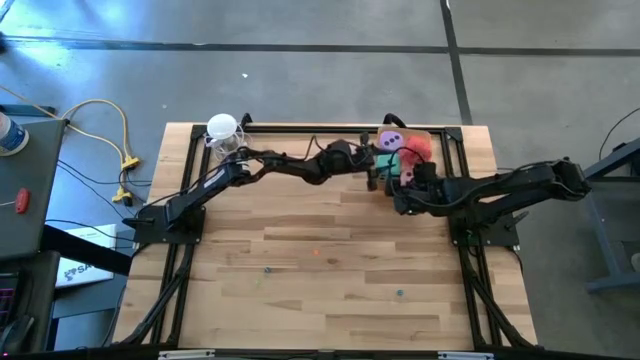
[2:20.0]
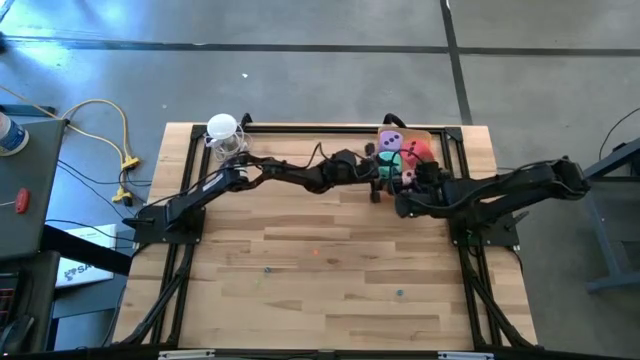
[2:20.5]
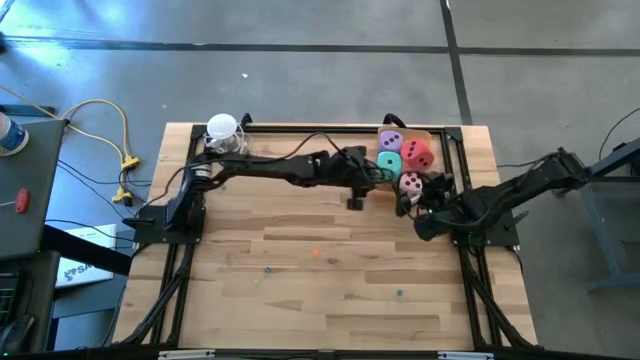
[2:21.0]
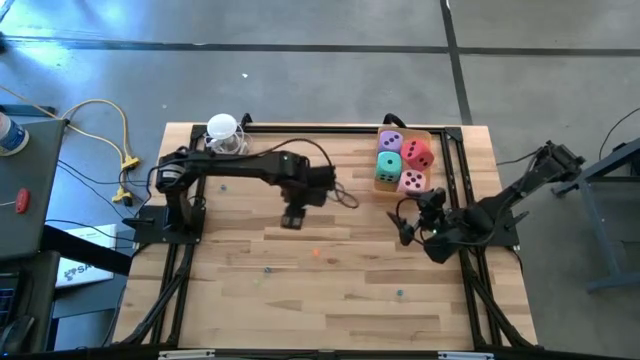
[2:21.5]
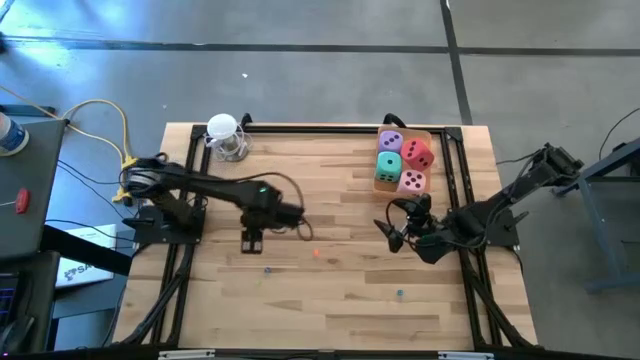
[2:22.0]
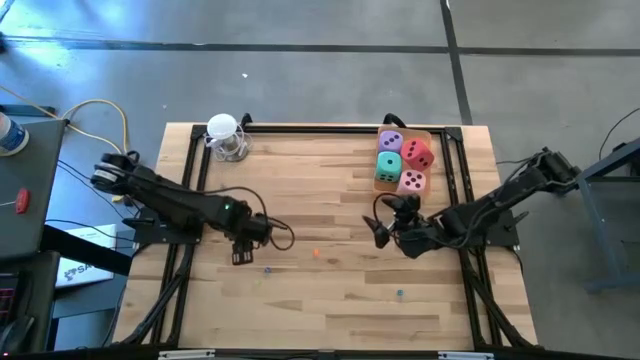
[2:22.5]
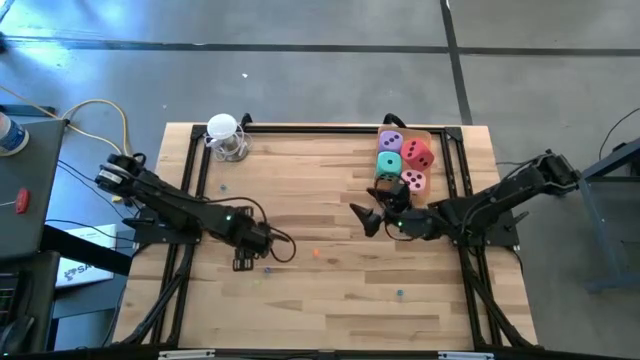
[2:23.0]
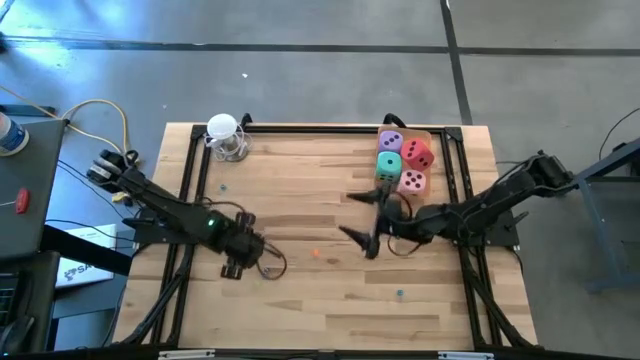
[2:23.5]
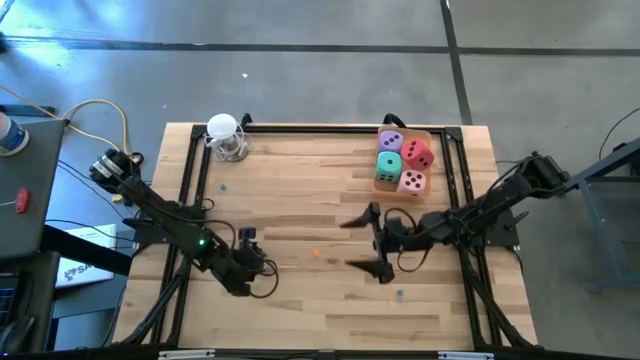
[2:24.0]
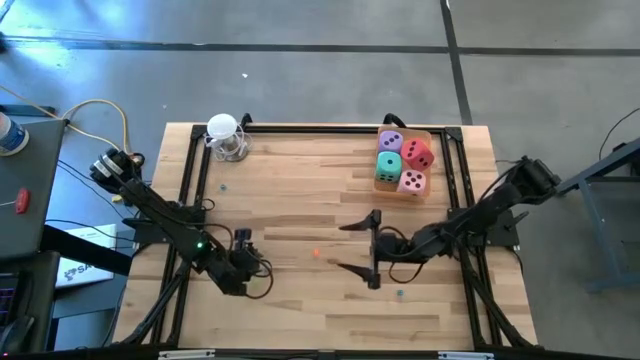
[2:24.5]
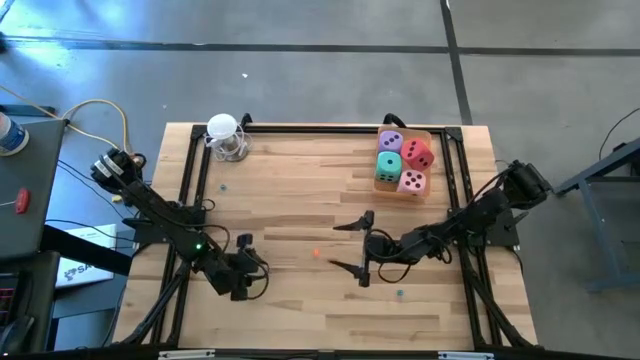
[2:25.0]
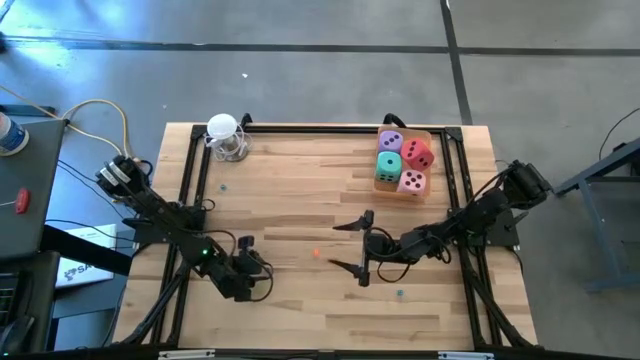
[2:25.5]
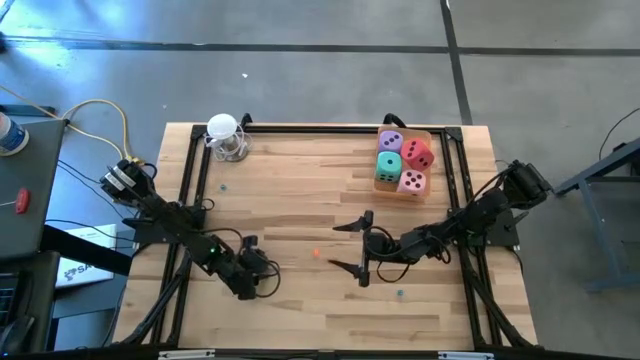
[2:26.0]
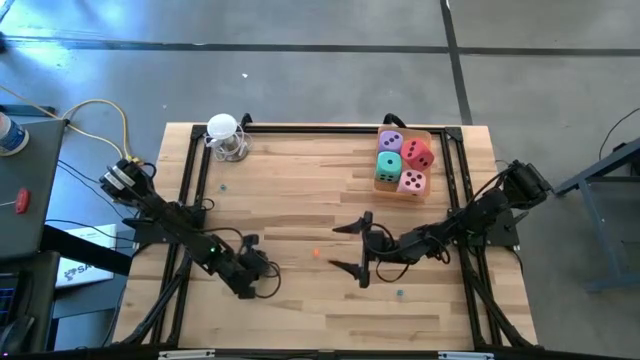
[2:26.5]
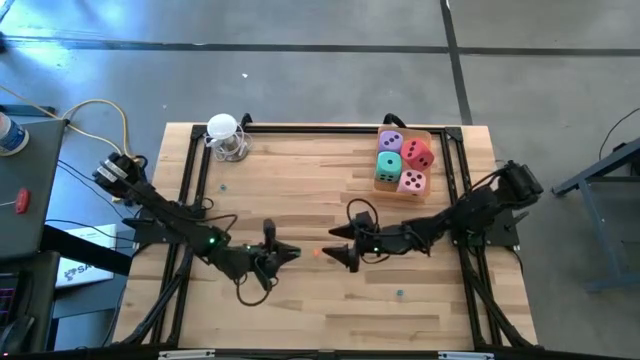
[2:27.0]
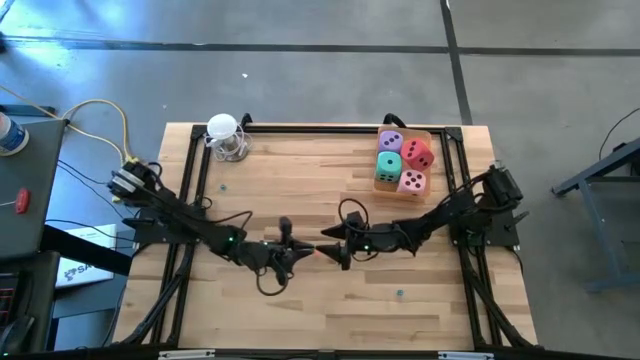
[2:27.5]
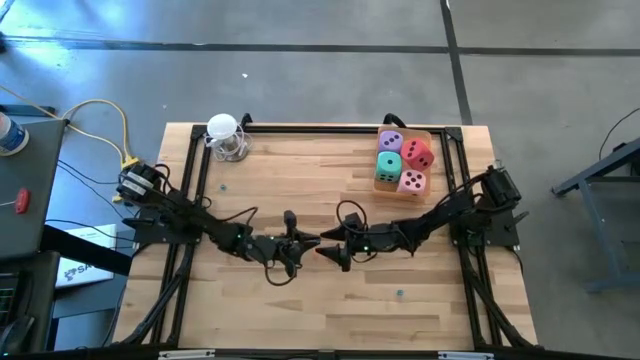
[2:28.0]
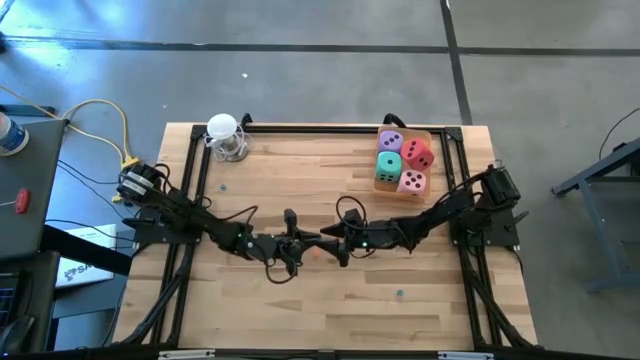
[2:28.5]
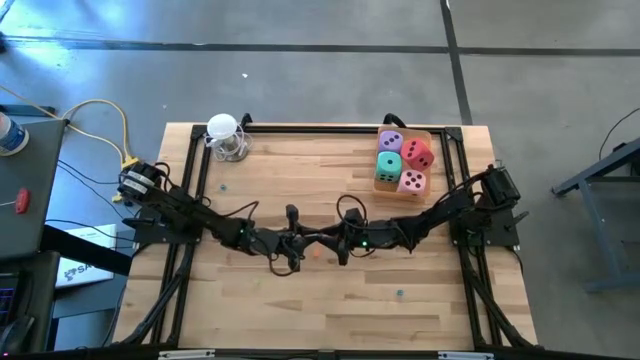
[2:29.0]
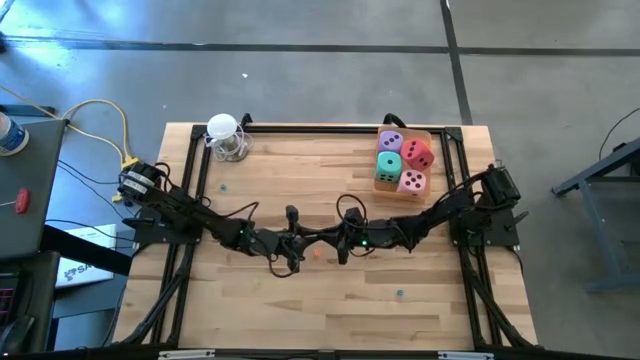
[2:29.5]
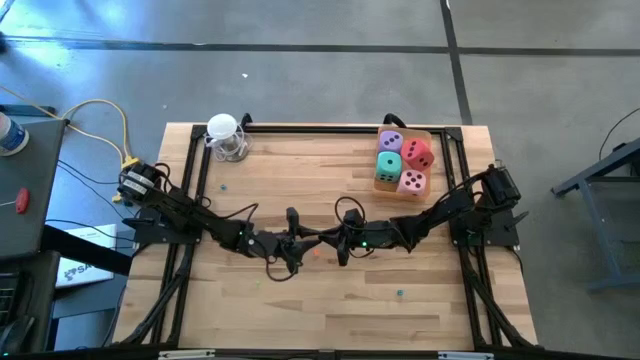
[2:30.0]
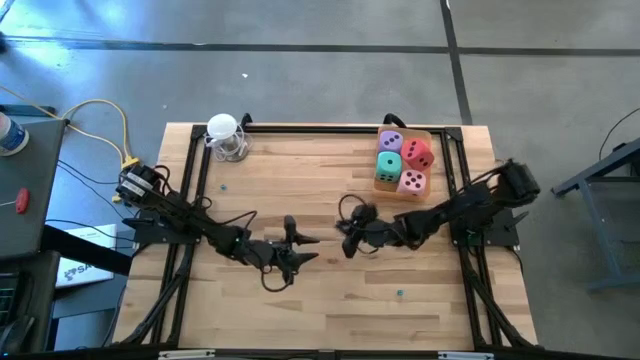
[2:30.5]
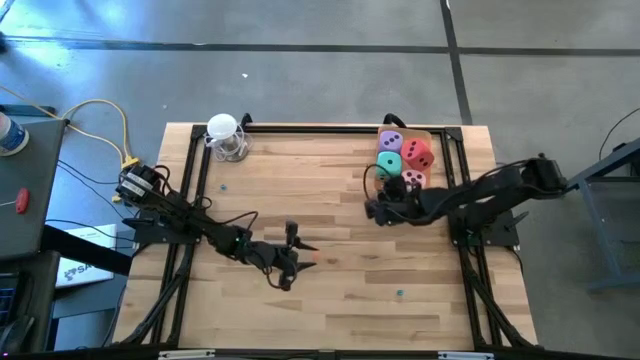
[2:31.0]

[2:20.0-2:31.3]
Task: Pick & Place Dice
Put the light blue small die into the orange bin

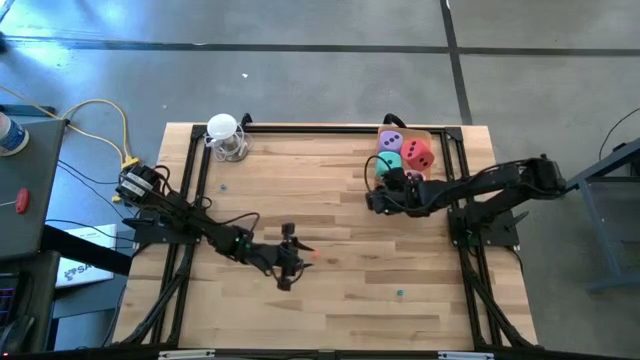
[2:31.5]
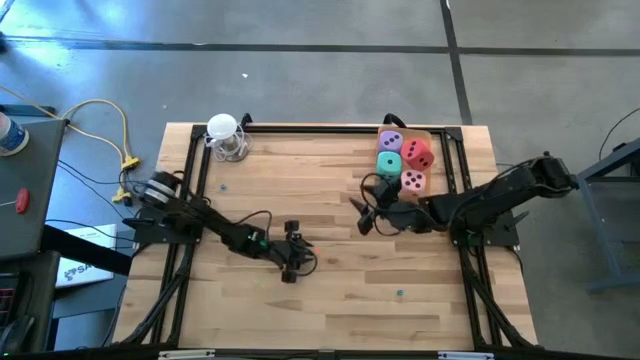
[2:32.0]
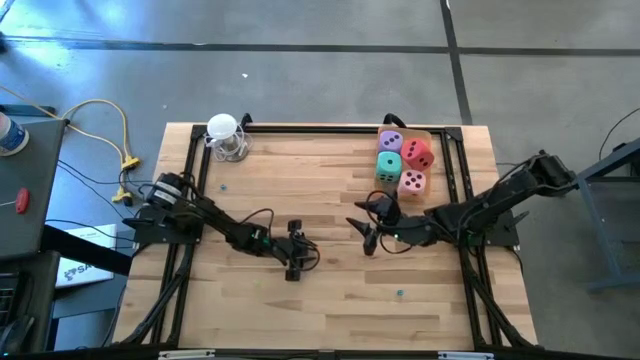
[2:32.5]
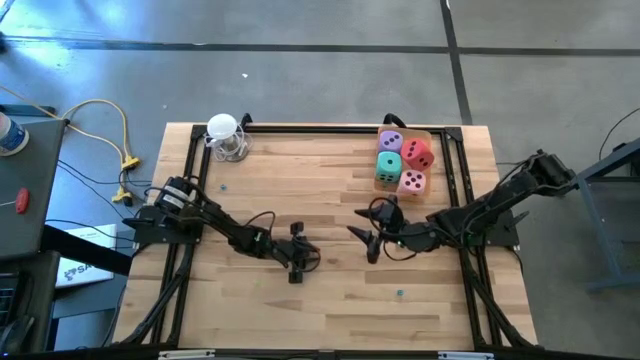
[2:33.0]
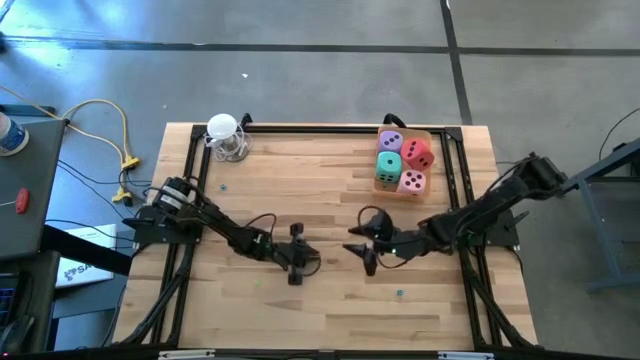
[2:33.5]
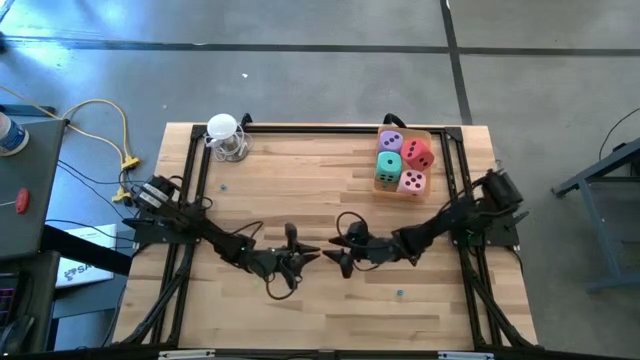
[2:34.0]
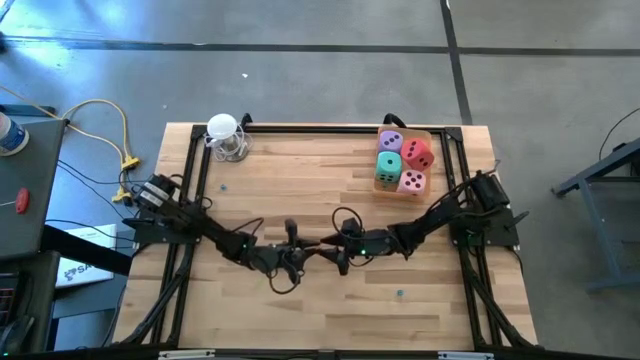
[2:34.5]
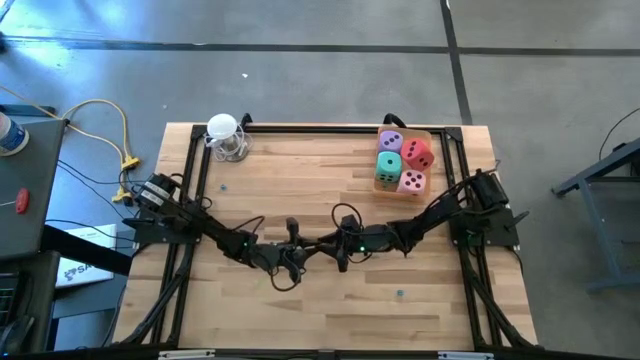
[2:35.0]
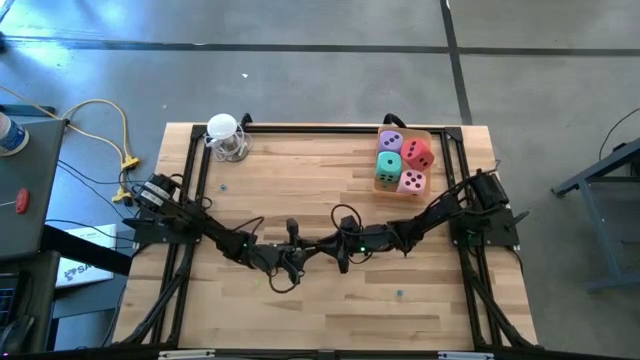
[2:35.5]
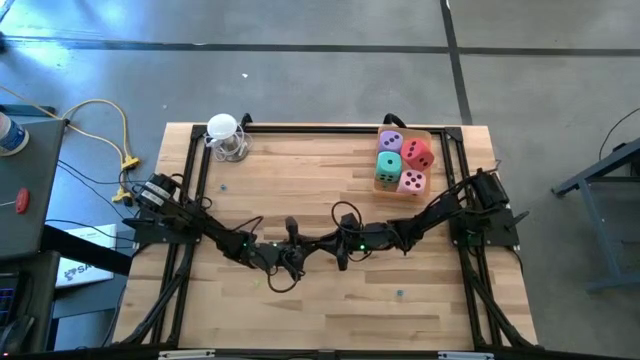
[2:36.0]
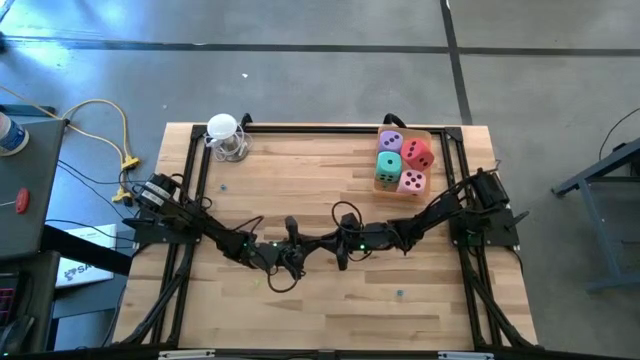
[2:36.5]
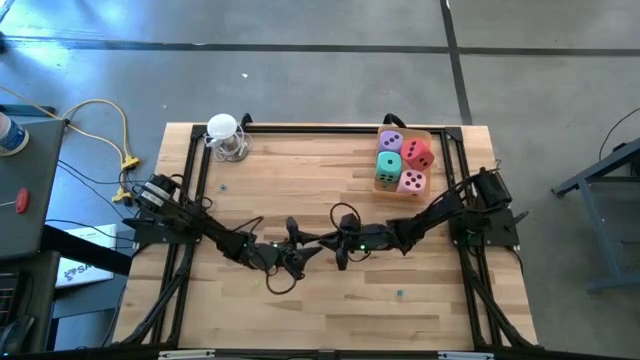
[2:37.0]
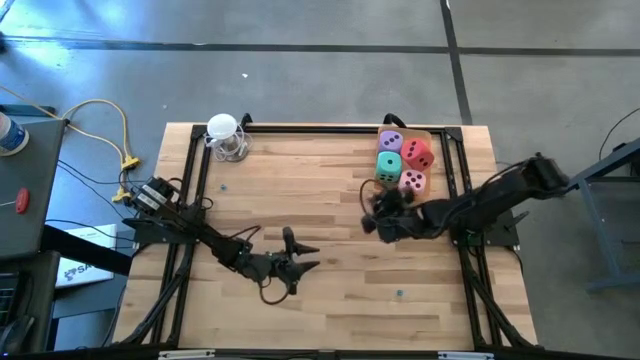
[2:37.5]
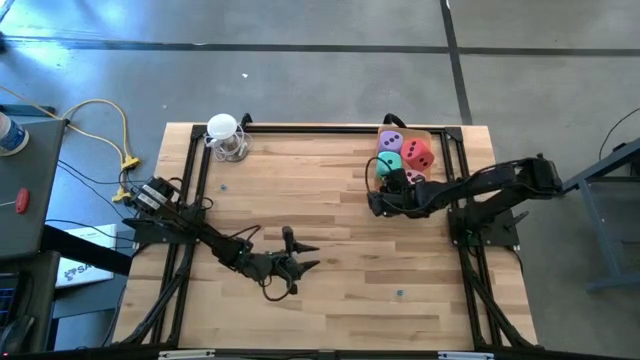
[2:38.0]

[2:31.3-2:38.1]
Put the orange small die into the orange bin

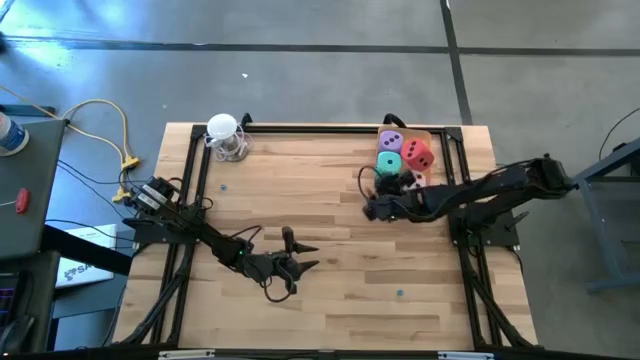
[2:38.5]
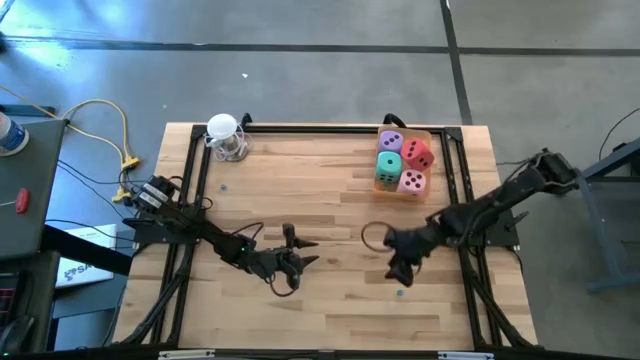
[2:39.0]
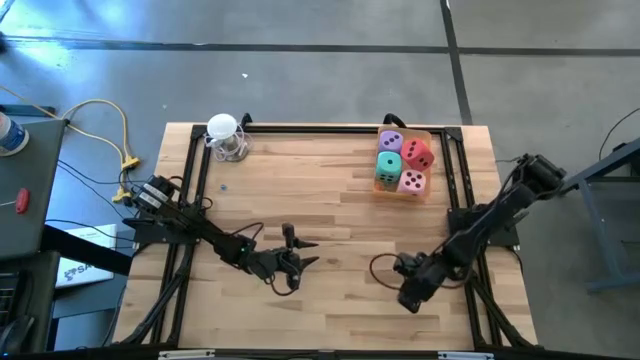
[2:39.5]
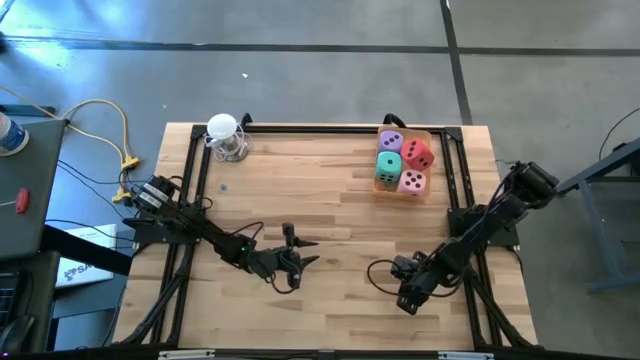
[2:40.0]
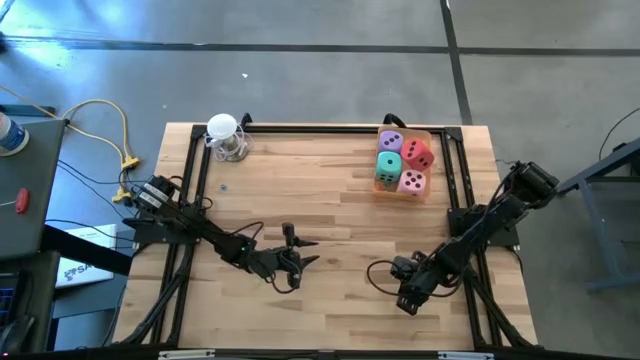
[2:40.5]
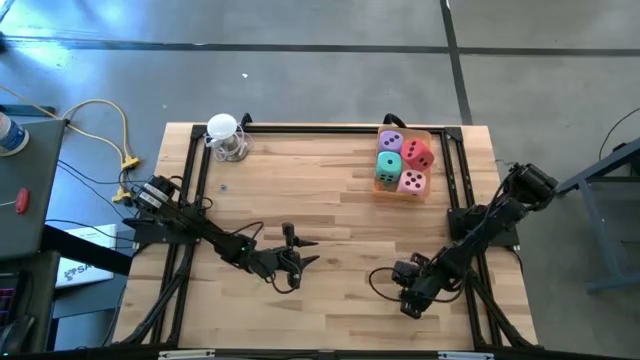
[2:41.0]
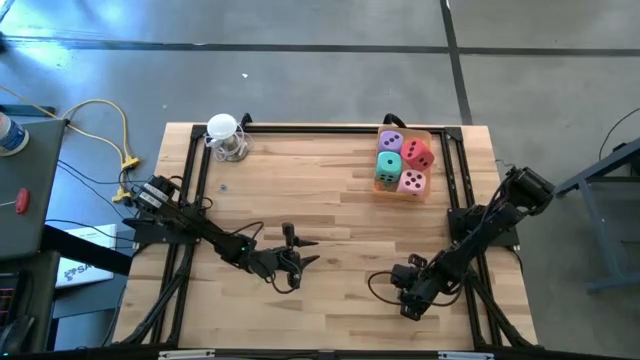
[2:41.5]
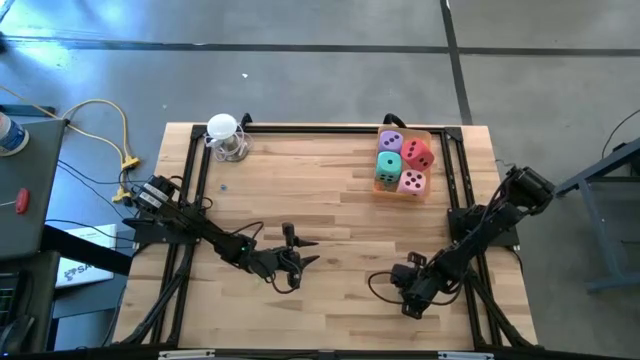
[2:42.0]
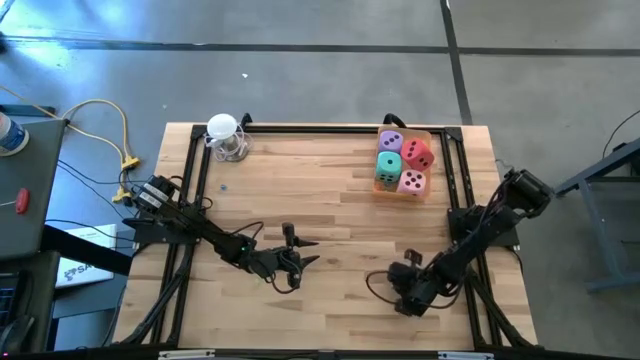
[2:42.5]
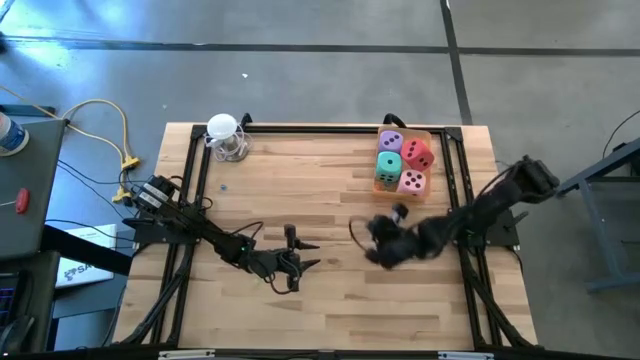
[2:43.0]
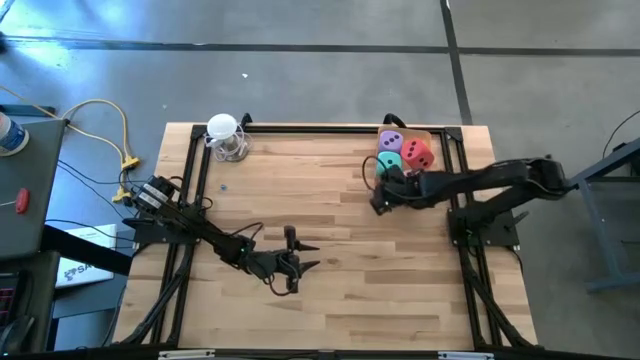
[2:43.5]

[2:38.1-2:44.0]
Put the light blue small die into the orange bin
